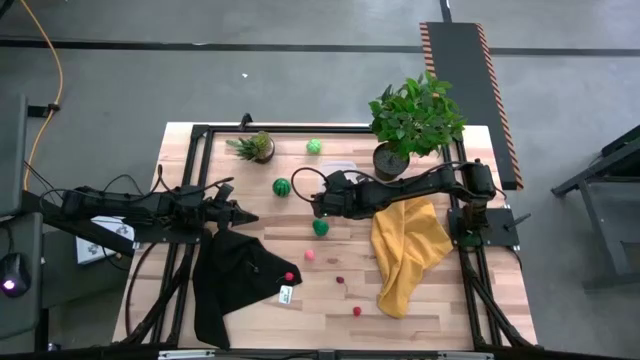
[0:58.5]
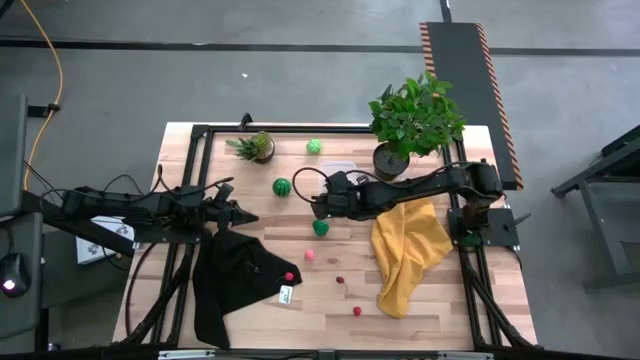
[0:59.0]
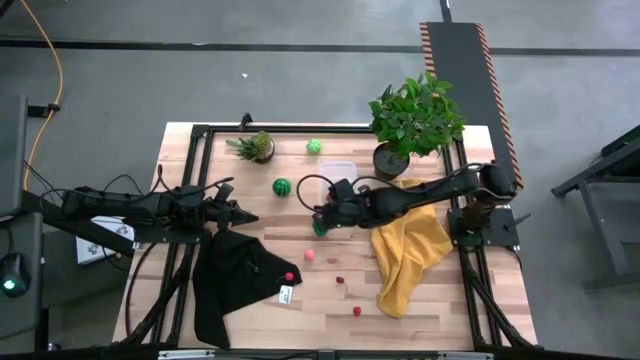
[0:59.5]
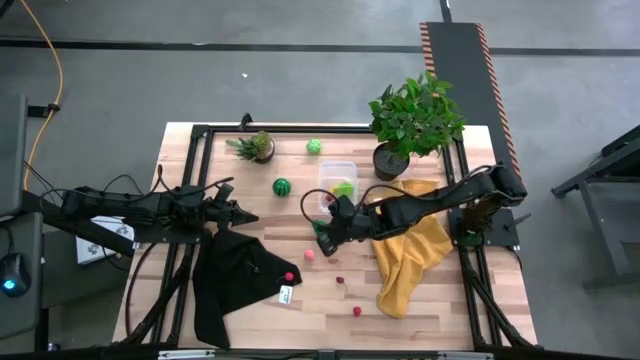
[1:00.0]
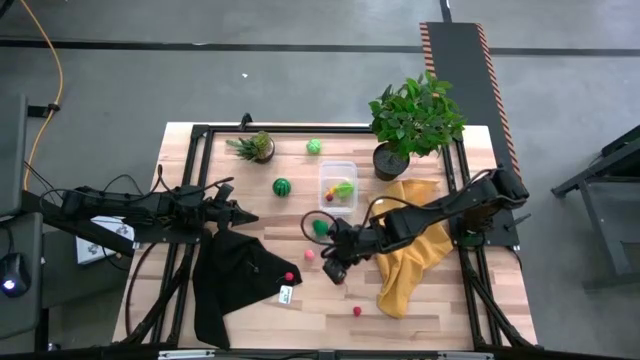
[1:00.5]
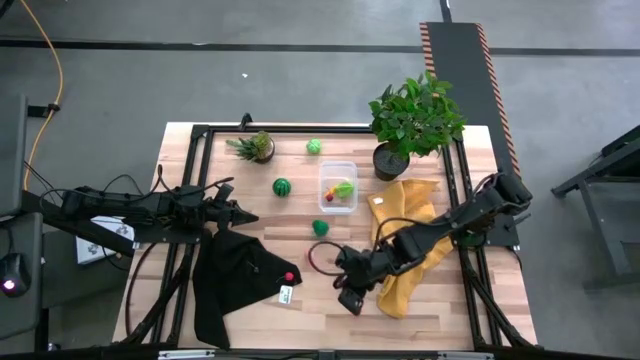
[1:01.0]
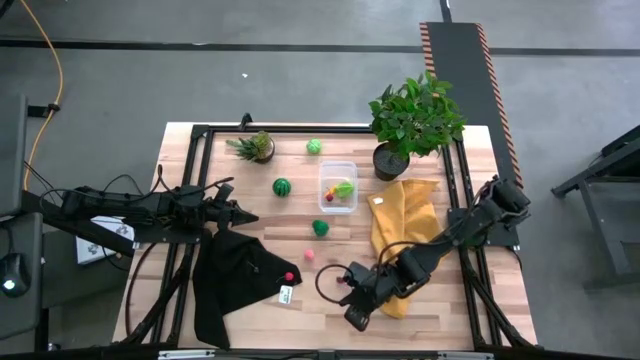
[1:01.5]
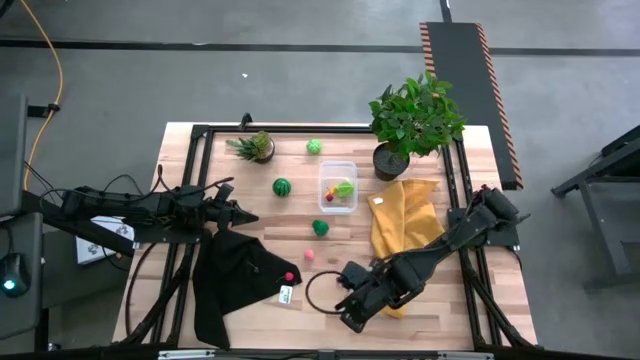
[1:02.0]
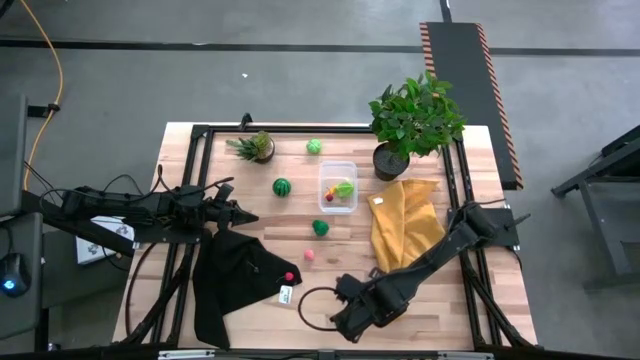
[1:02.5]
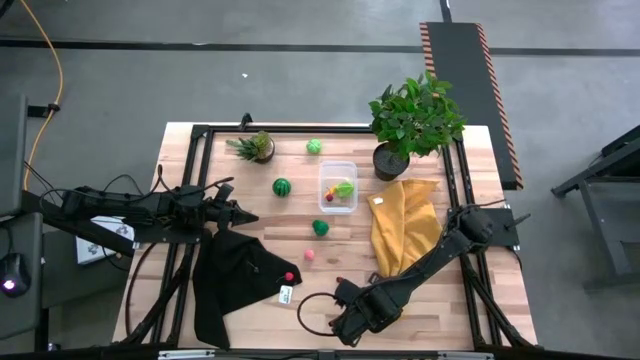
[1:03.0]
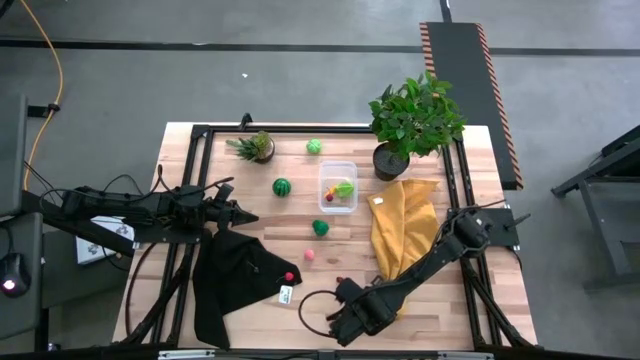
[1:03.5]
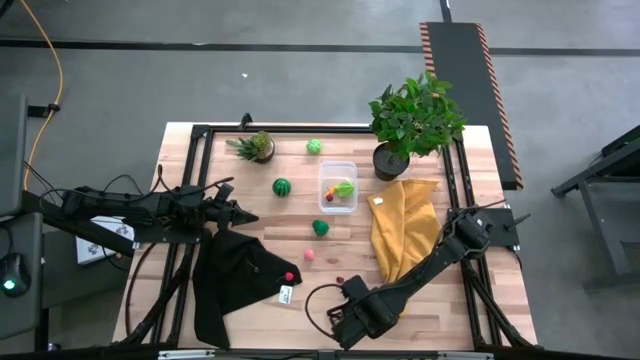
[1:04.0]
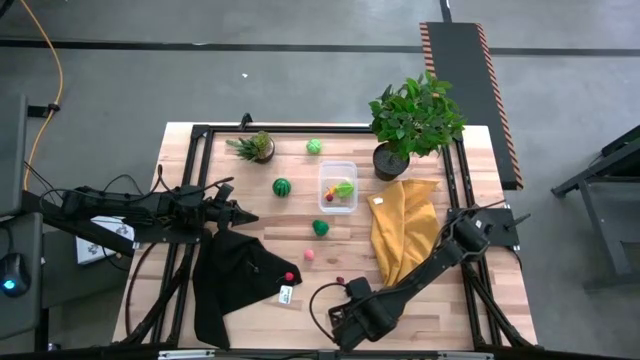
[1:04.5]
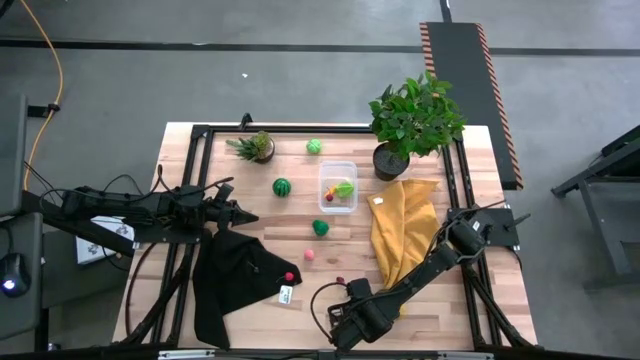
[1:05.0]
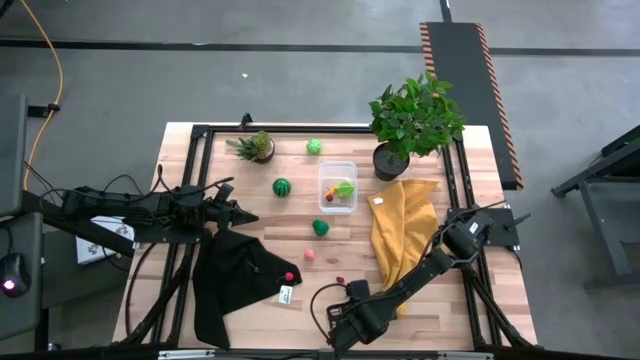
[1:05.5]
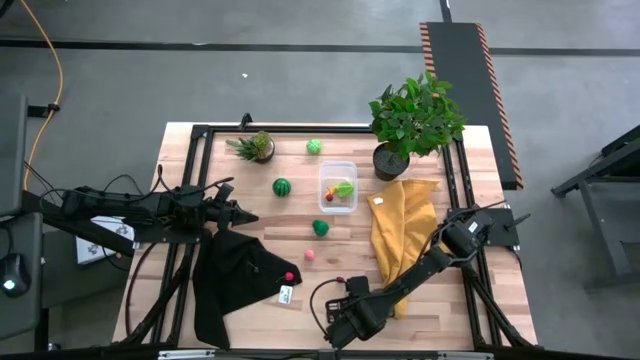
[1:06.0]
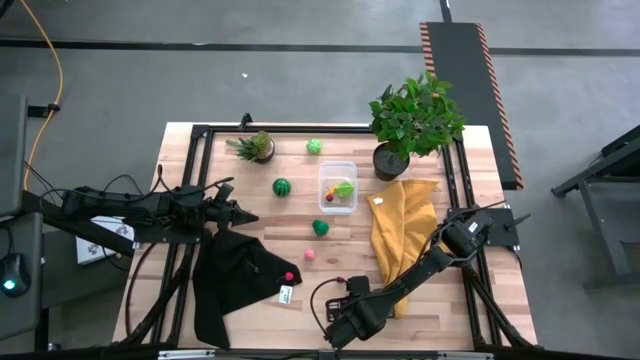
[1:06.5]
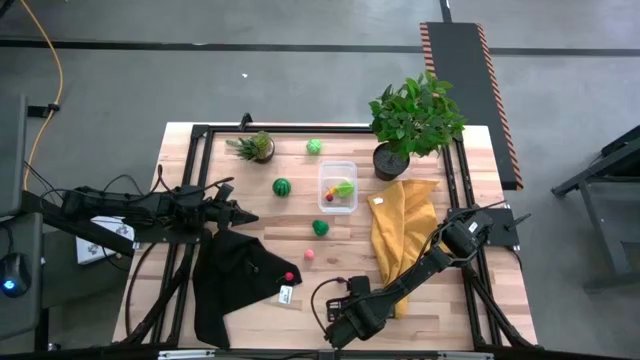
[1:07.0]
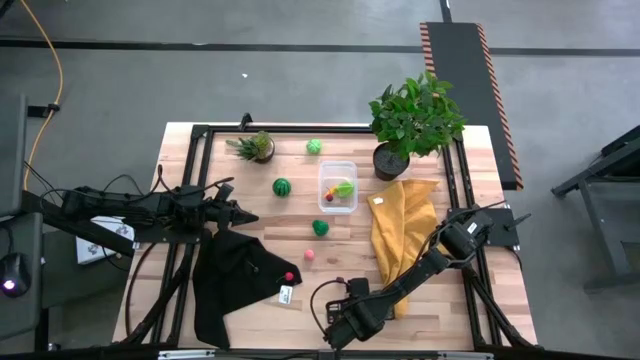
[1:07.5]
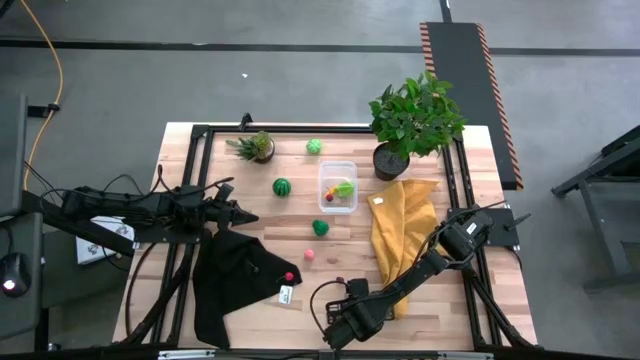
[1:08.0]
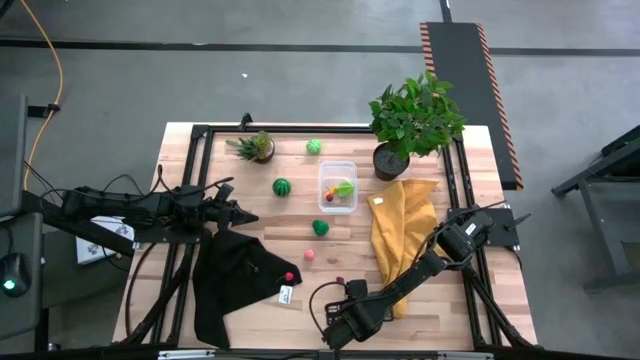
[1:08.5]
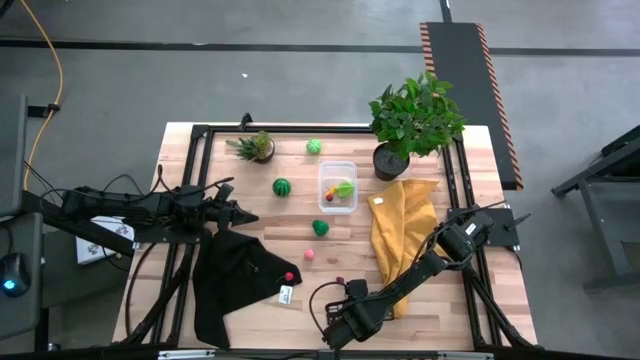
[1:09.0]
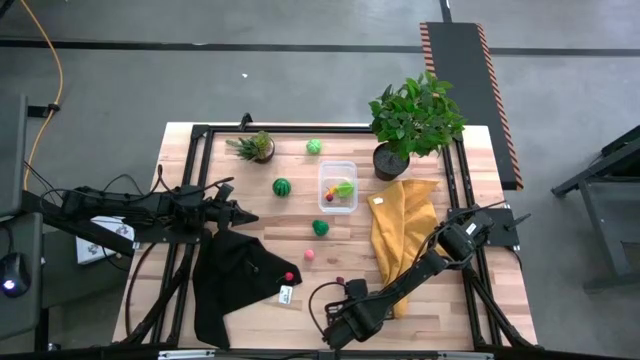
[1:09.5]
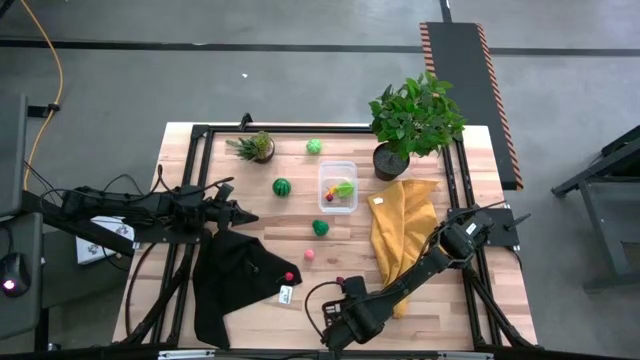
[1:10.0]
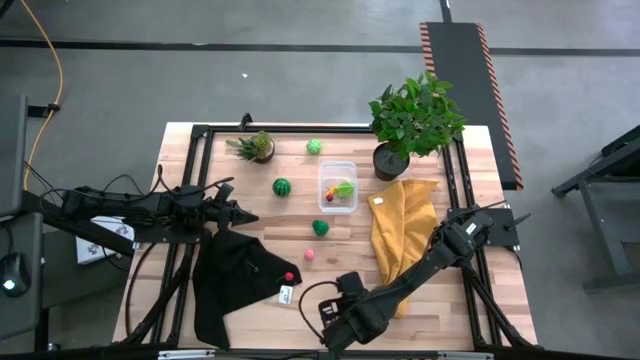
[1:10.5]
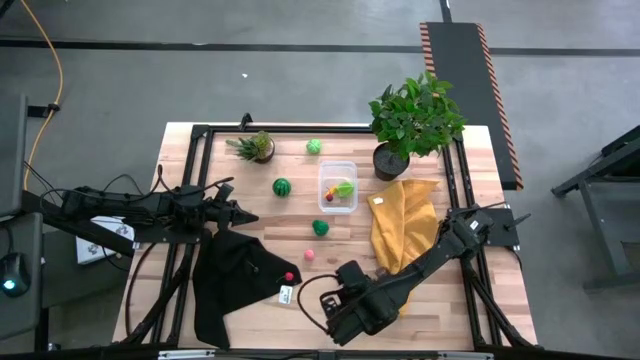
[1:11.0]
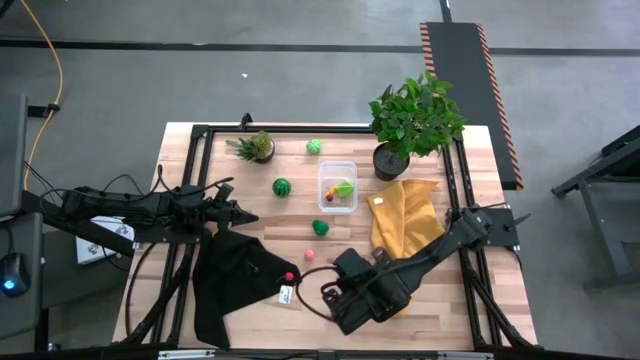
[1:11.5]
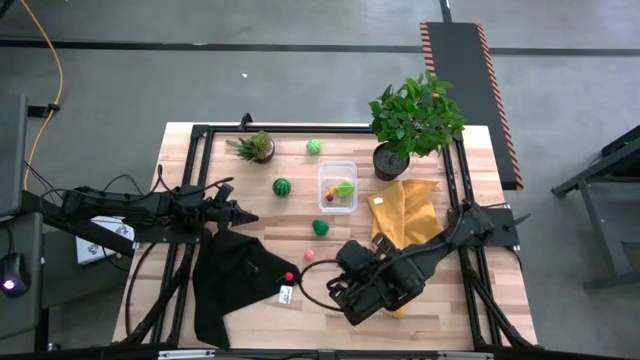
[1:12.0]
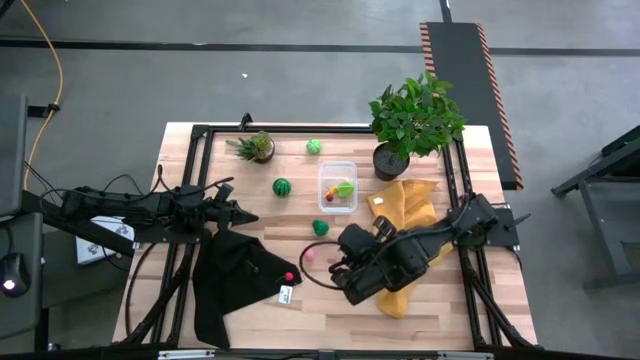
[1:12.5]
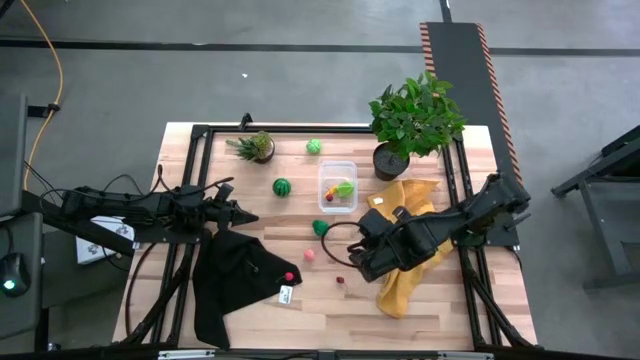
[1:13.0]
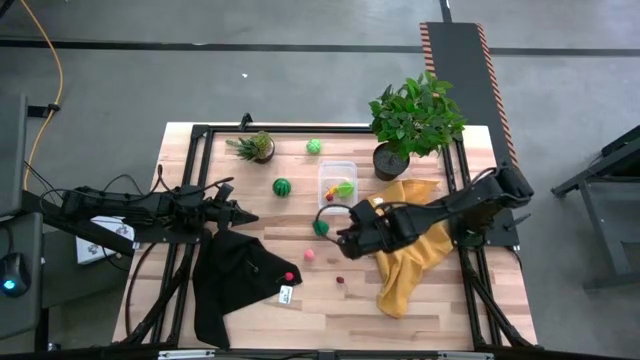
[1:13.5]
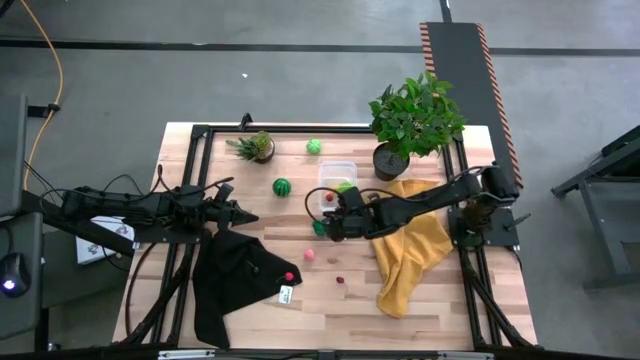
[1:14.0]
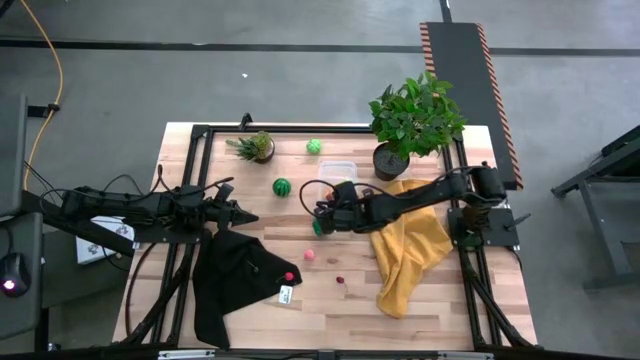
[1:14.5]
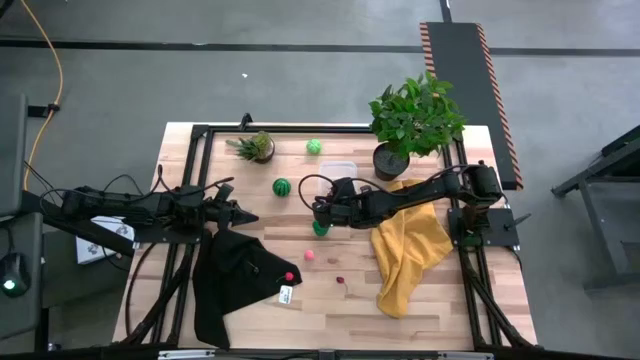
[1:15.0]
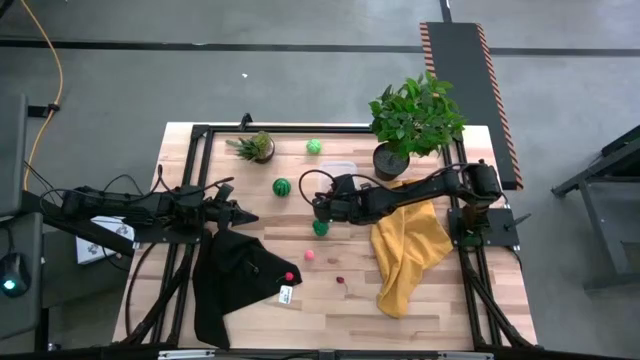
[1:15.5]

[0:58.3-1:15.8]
Task: Pick and placing Produce into tupperware
Put the raspberry into the transparent bin

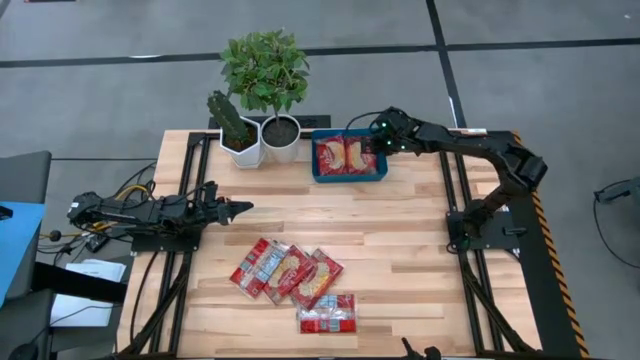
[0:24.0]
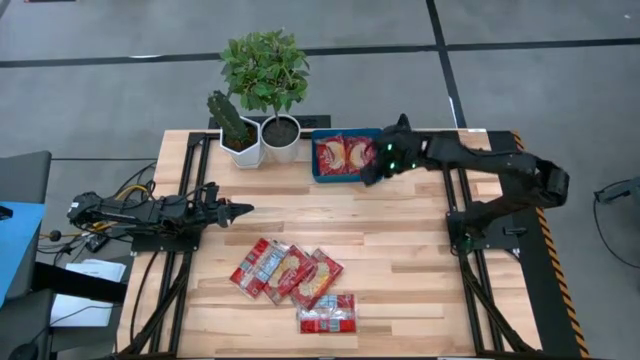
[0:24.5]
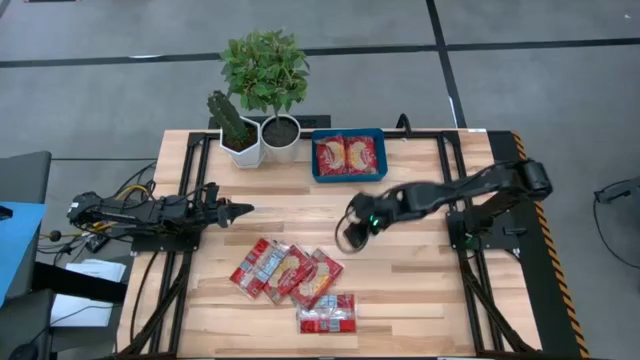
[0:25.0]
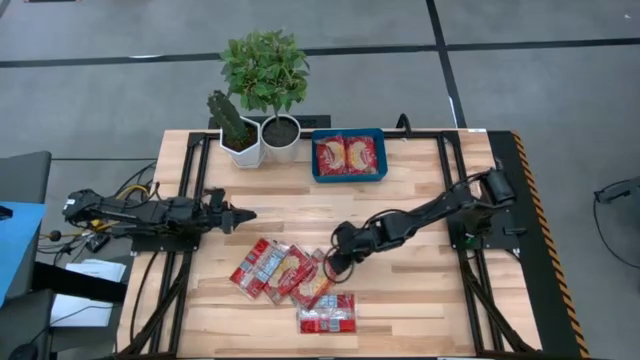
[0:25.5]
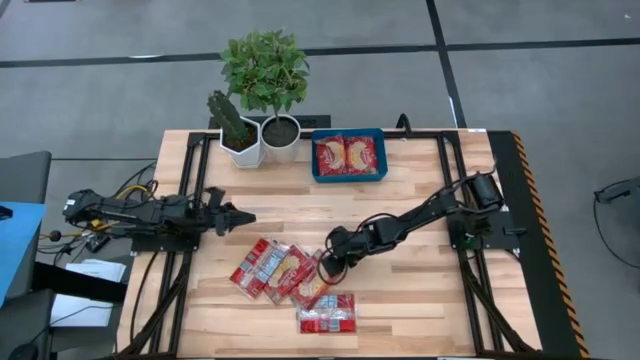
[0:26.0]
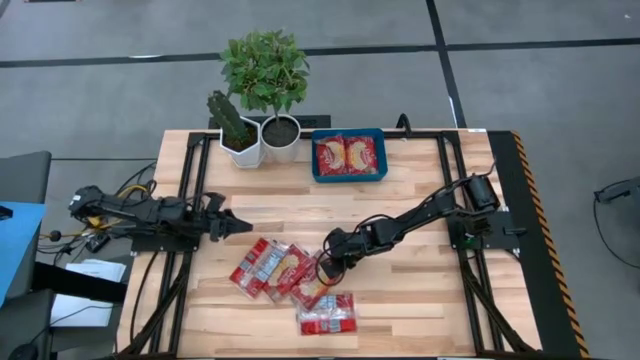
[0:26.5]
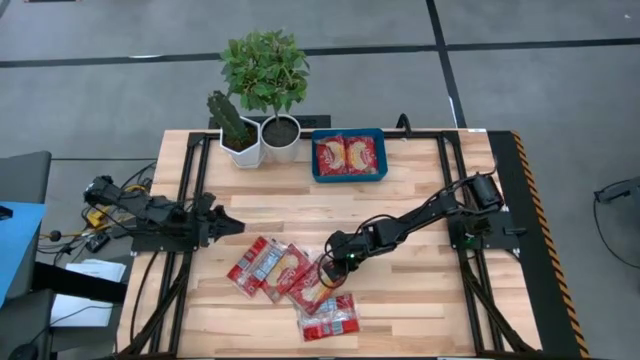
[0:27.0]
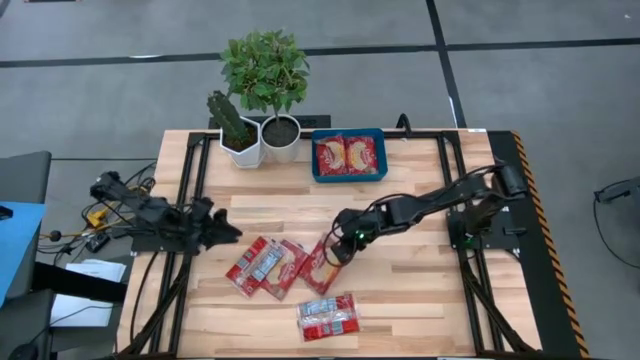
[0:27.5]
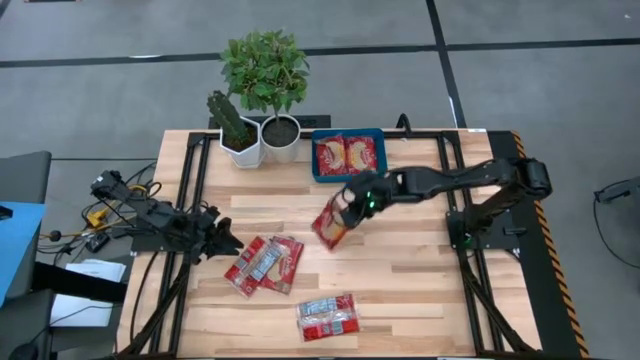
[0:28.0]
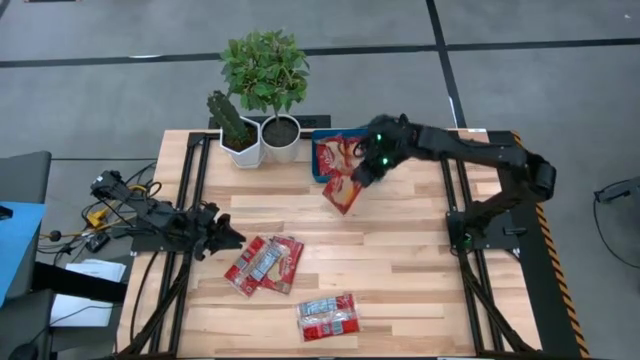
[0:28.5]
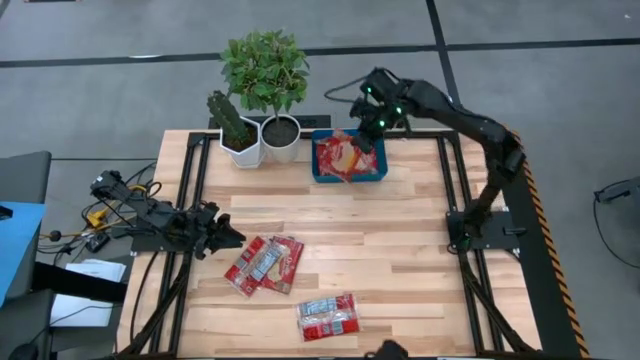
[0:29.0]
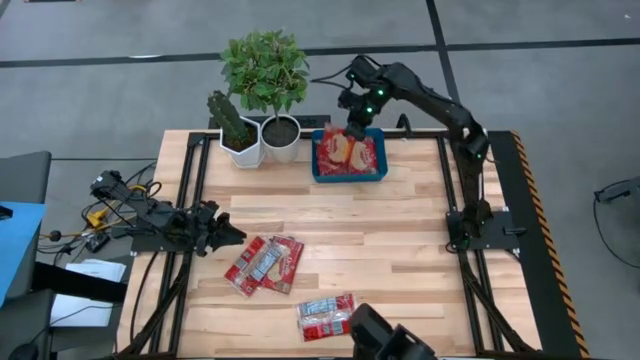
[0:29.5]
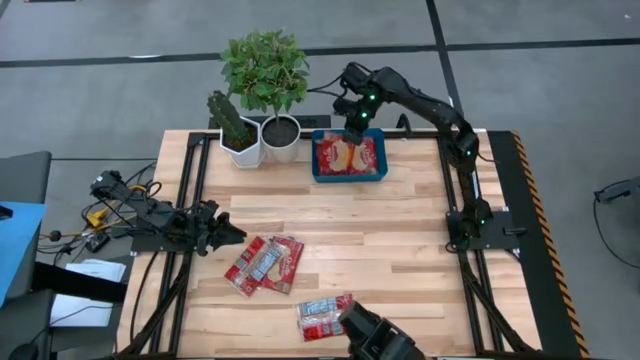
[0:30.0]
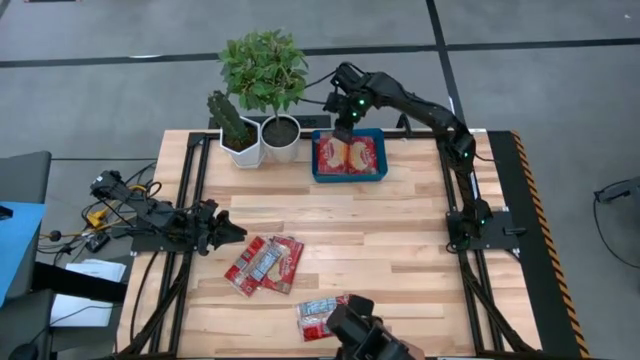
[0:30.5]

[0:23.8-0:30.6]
Task: Sort popcorn bags into baskets
Put the red popcorn bag into the blue container
